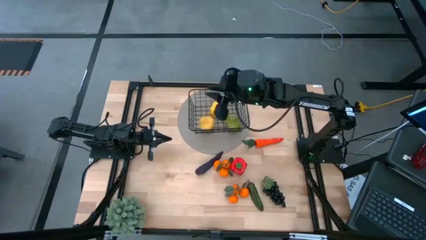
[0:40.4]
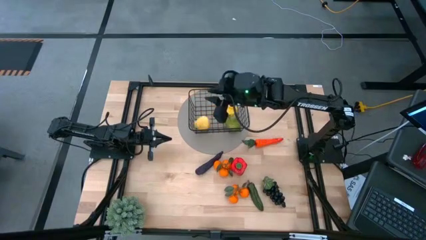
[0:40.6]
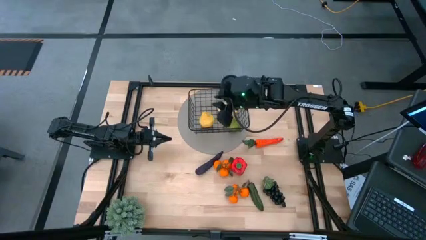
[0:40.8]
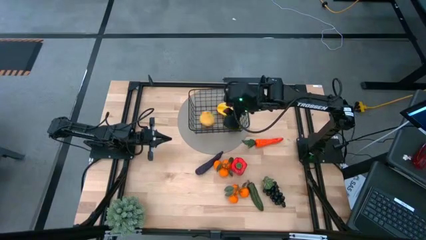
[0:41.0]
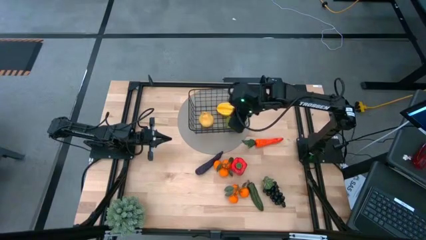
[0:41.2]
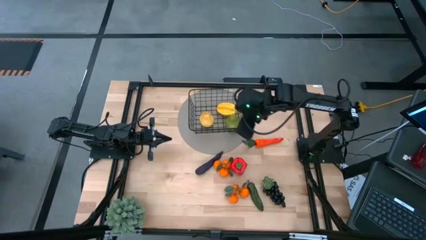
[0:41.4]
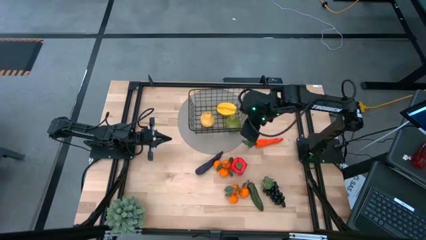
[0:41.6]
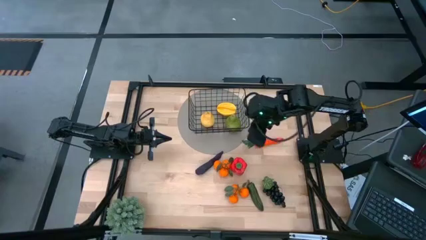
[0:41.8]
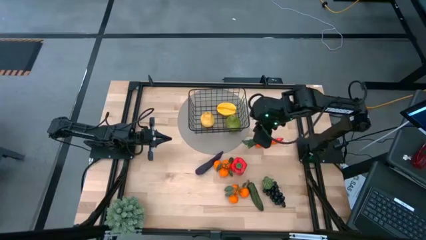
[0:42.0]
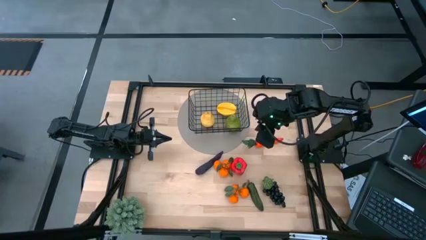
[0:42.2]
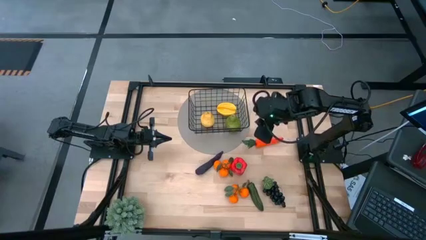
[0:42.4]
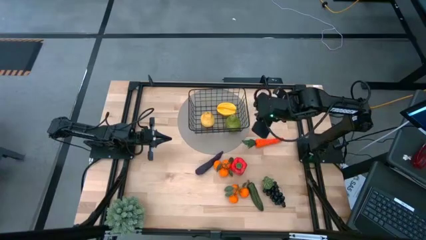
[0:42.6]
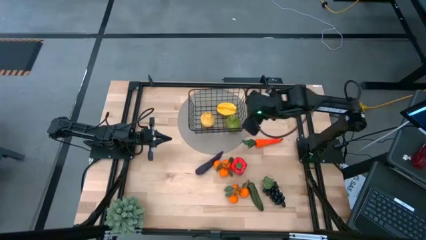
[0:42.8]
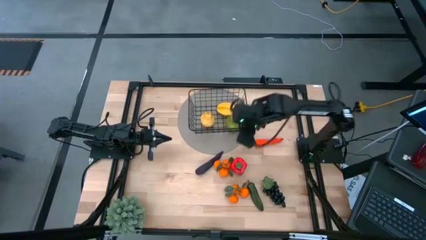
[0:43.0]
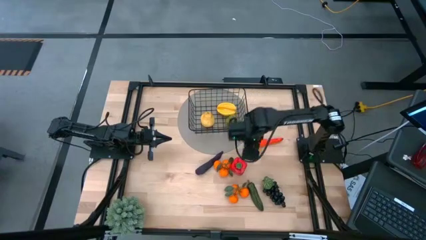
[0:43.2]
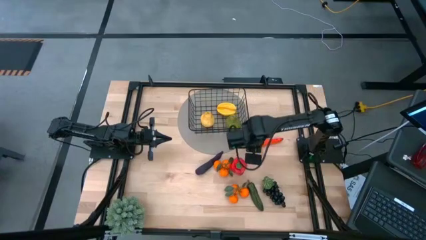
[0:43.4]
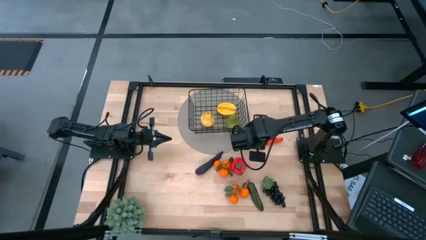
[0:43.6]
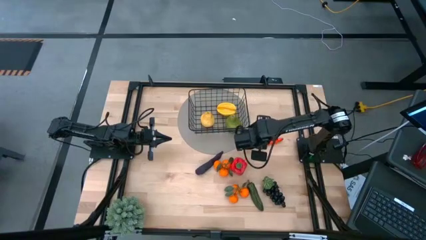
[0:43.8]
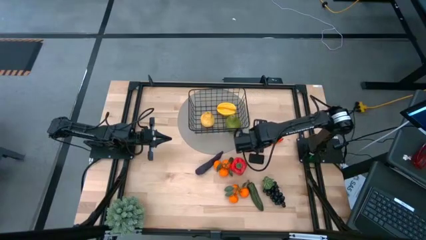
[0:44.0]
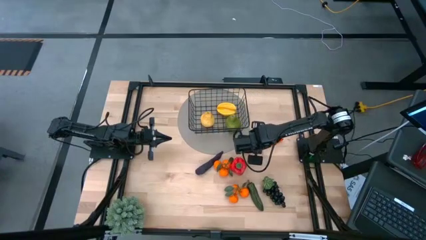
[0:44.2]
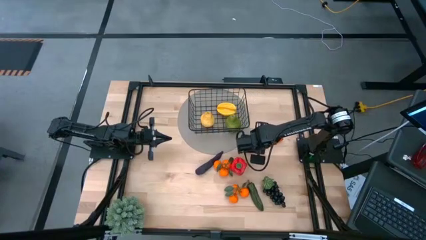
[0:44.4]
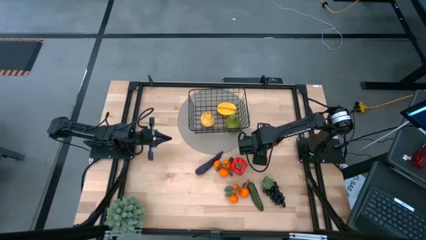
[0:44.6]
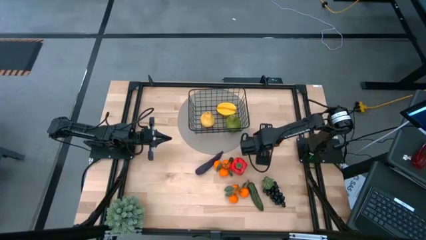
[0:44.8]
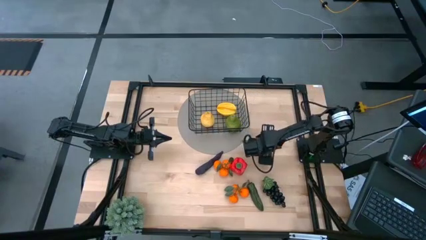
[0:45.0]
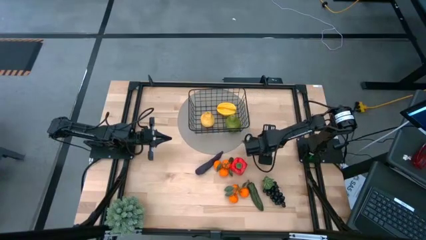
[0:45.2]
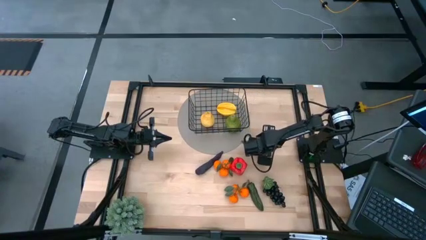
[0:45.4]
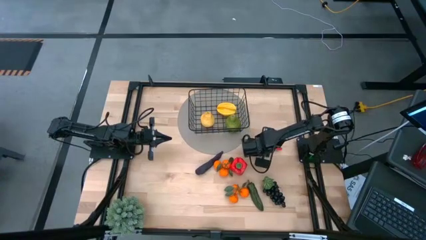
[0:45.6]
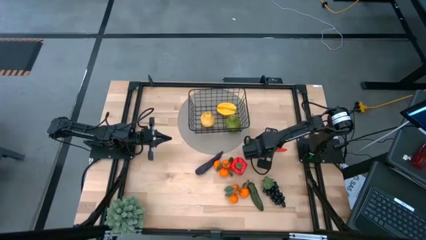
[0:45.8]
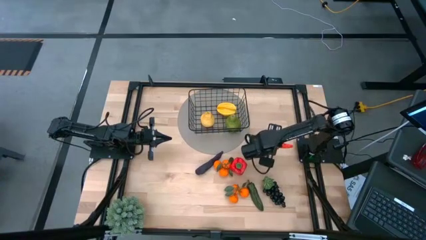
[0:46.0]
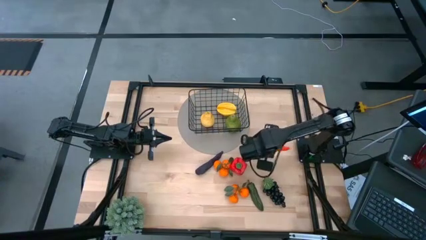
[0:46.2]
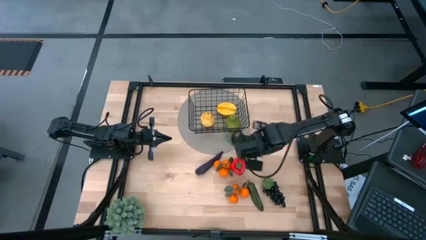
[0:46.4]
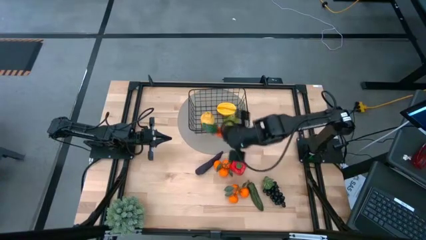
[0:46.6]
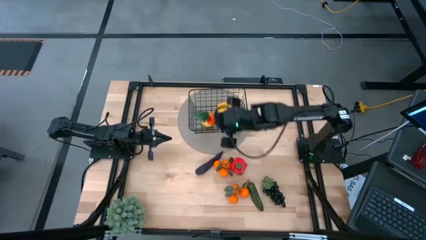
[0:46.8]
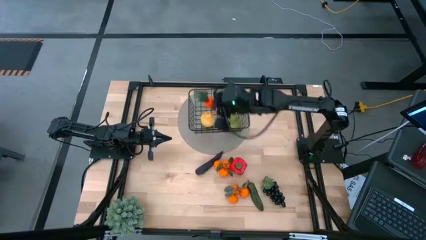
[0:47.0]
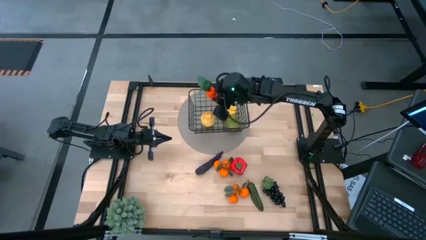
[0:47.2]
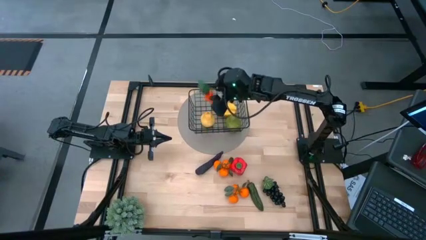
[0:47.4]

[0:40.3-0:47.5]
Task: Build produce basket
Put the orange carrot into the black wire basket

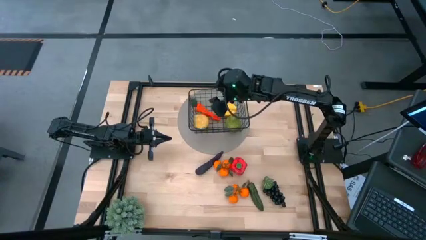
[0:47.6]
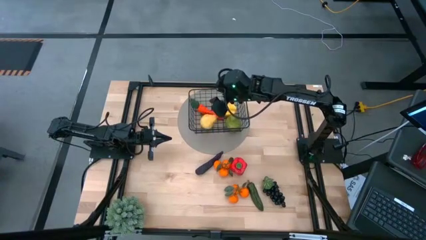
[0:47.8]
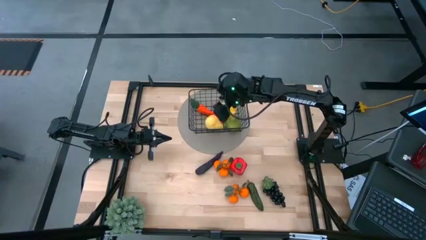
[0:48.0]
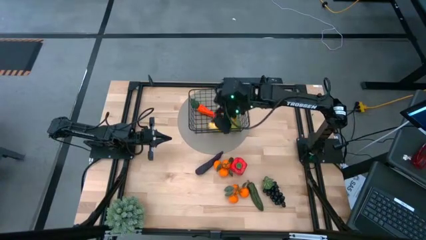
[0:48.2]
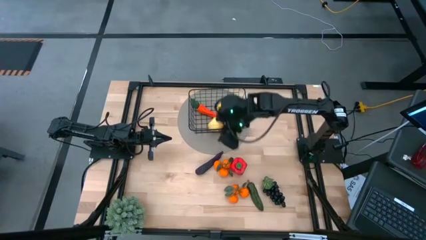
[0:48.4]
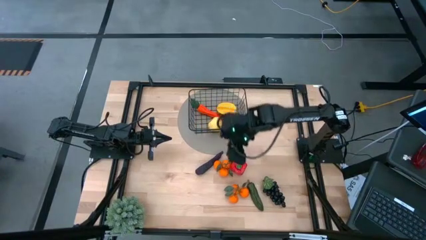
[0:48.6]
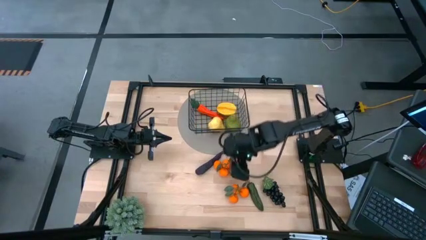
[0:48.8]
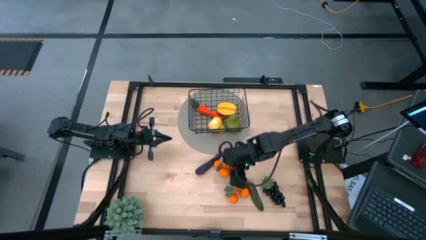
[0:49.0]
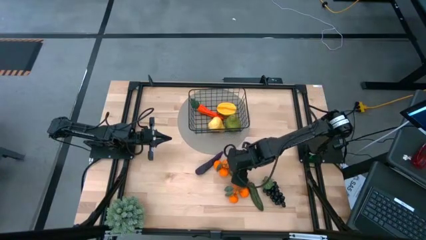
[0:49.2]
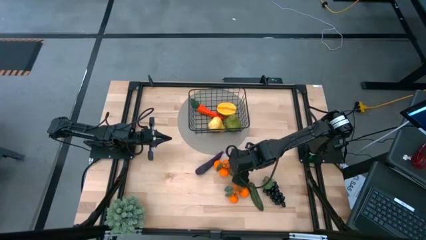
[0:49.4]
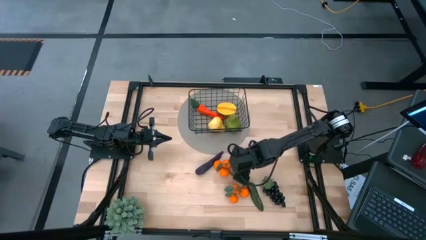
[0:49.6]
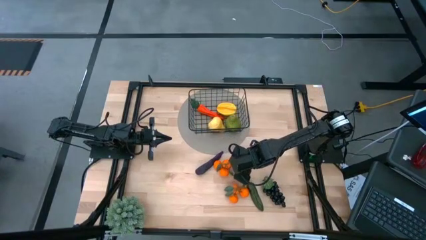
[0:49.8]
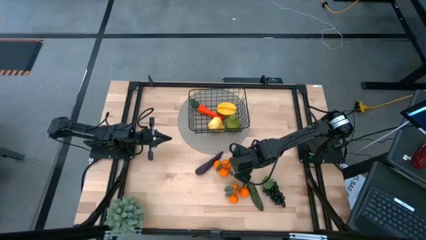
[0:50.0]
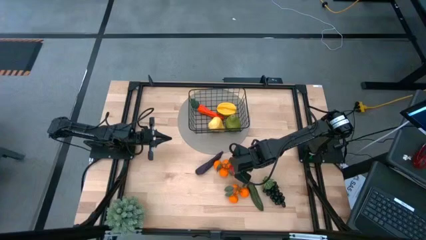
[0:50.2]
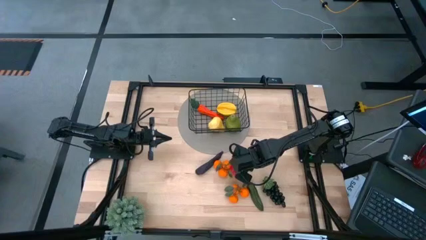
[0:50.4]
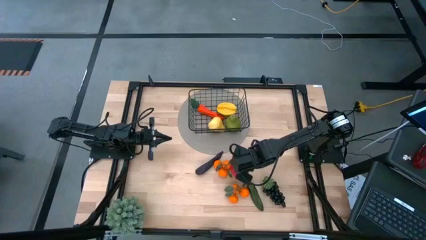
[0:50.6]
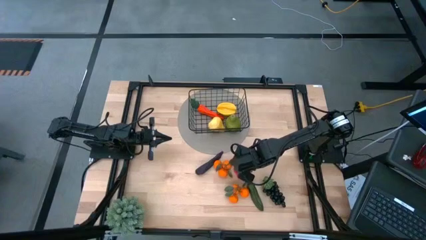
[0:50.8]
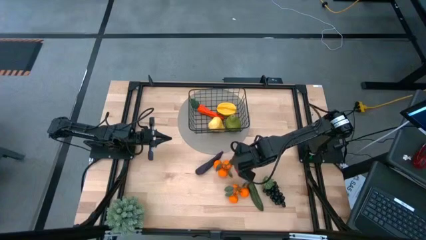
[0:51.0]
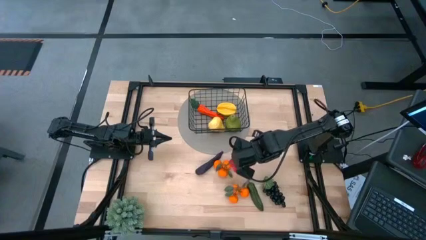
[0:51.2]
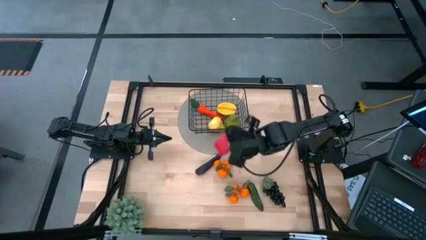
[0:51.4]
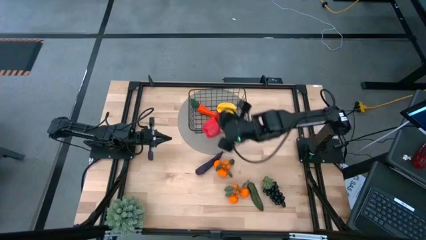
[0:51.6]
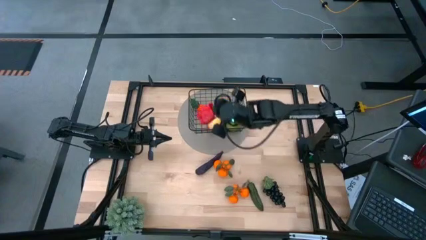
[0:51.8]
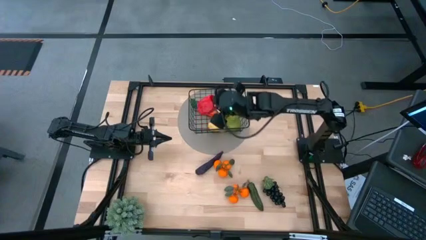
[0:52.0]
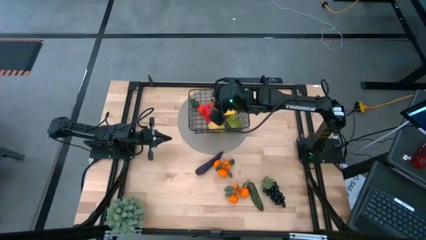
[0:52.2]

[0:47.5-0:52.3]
Put the red bell pepper into the black wire basket

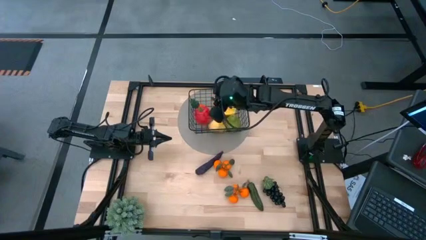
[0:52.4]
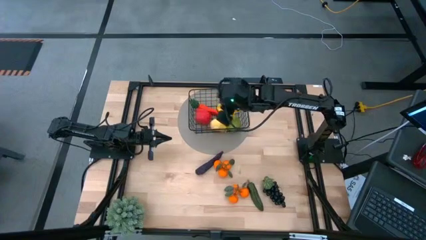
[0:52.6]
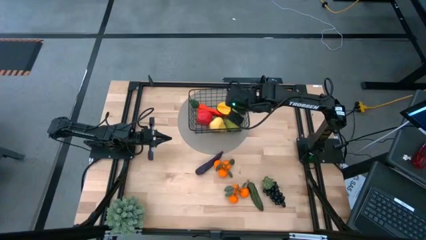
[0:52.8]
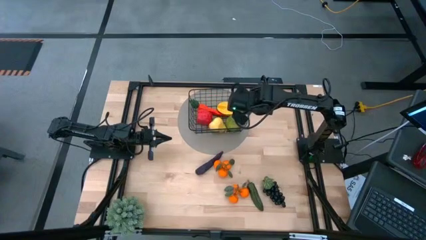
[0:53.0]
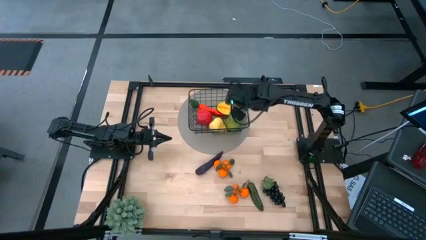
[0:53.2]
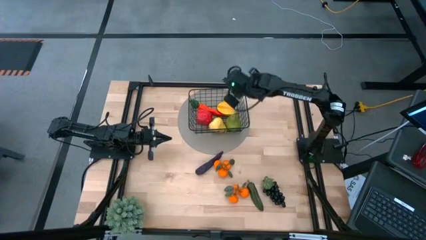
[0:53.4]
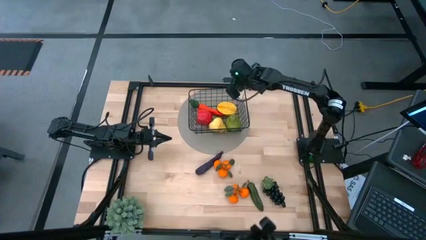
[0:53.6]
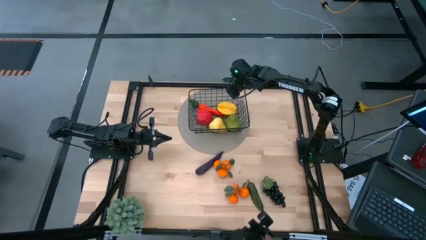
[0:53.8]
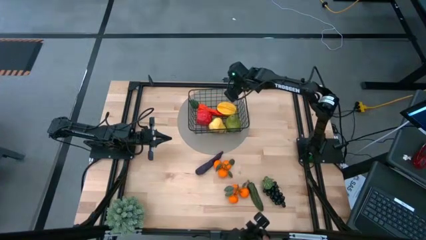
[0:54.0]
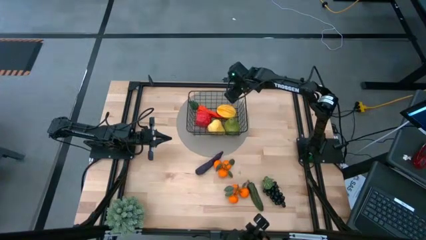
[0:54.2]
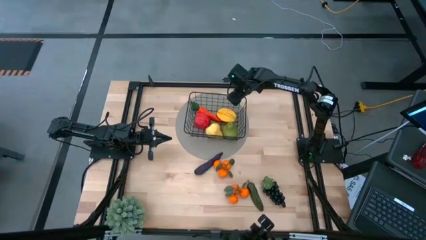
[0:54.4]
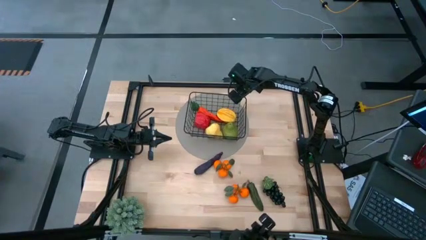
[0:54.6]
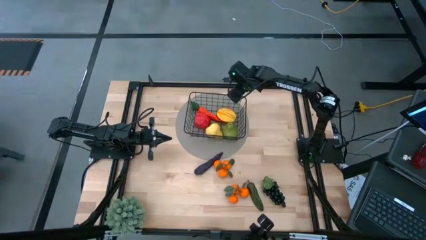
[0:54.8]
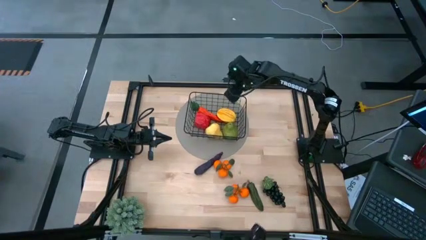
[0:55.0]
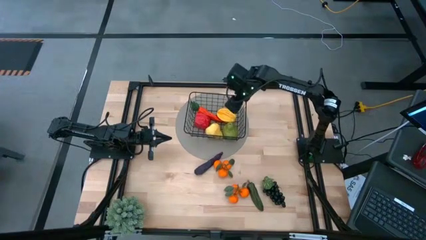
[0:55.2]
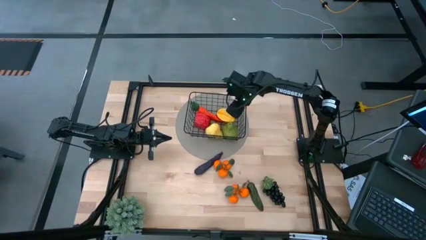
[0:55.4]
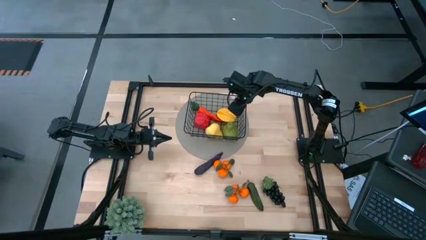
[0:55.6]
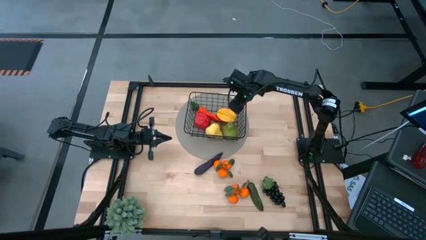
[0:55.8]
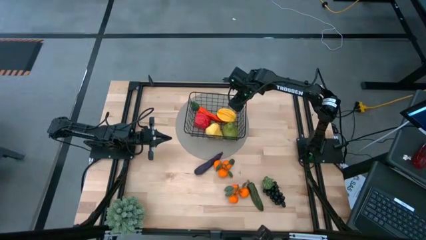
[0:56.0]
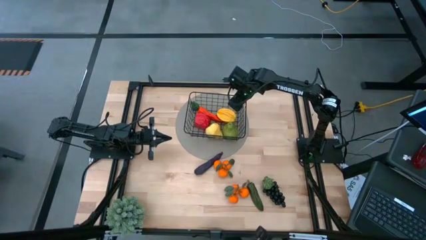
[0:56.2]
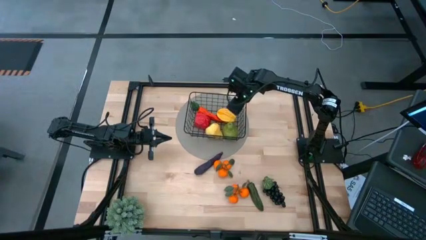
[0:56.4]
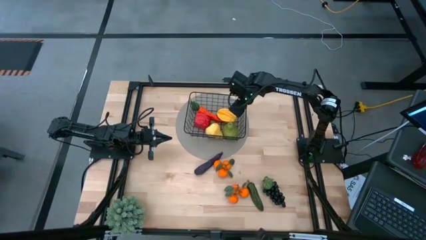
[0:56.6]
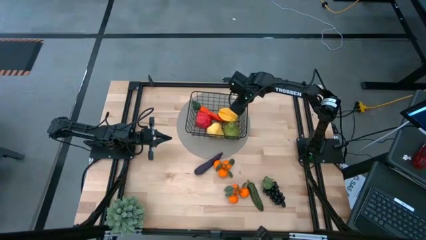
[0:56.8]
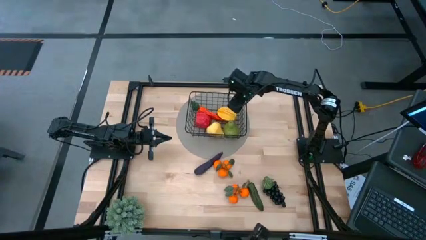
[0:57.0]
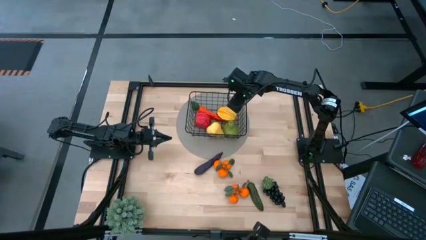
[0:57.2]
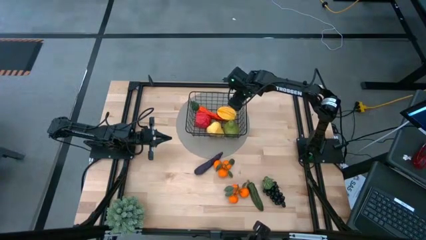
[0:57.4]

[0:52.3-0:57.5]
Adjust the black wire basket
